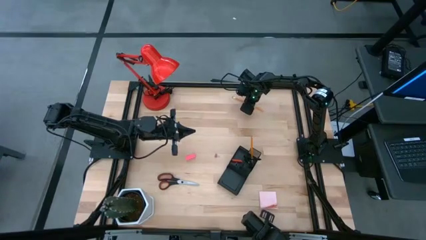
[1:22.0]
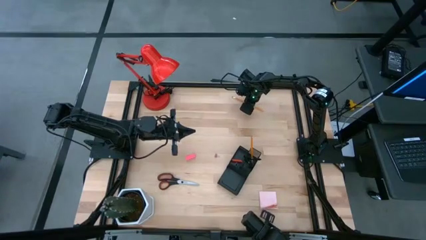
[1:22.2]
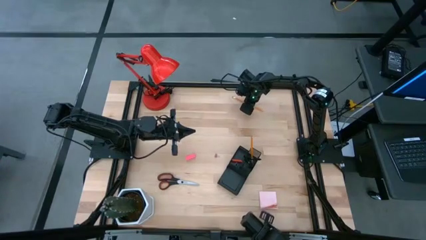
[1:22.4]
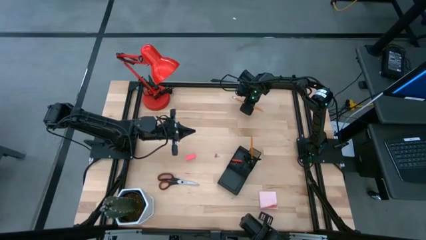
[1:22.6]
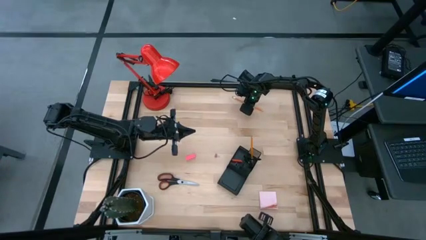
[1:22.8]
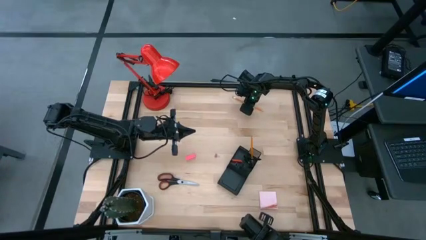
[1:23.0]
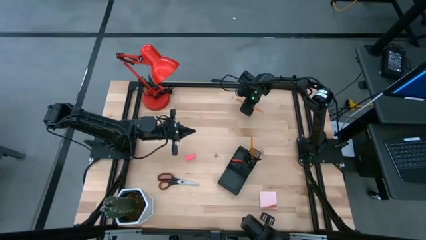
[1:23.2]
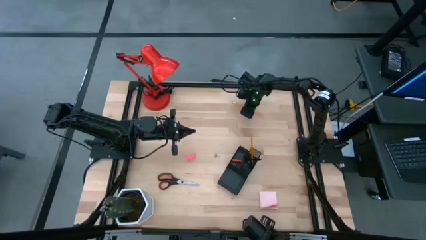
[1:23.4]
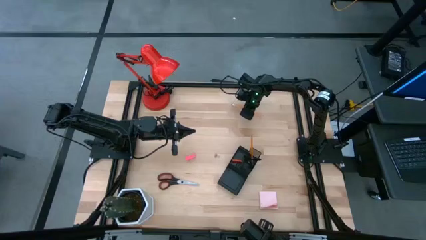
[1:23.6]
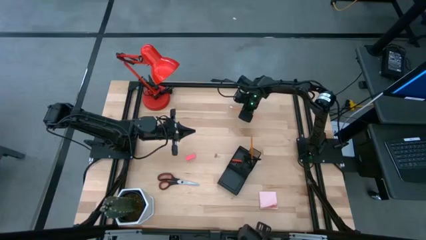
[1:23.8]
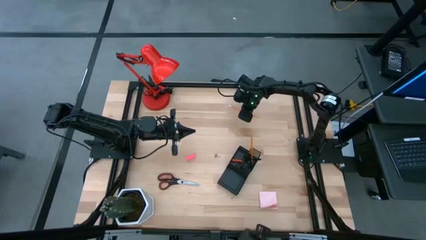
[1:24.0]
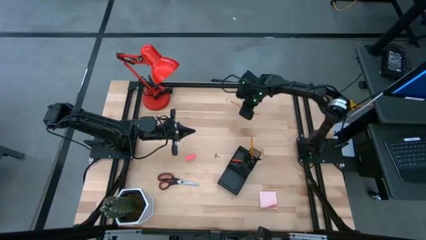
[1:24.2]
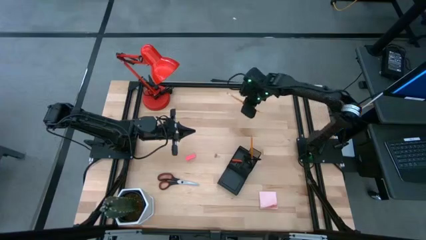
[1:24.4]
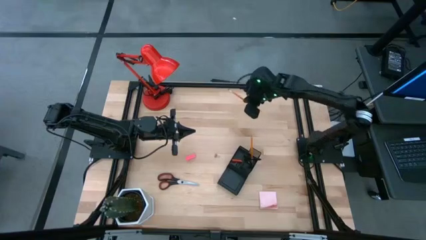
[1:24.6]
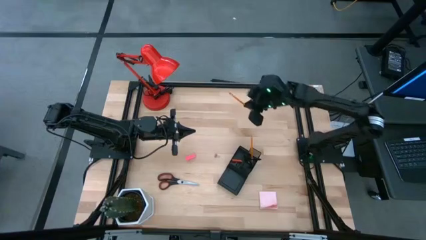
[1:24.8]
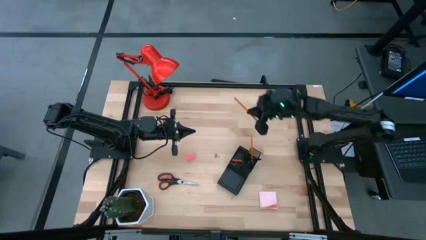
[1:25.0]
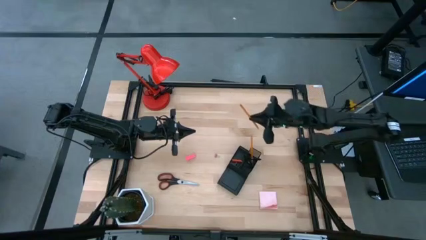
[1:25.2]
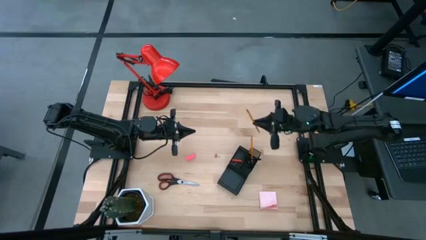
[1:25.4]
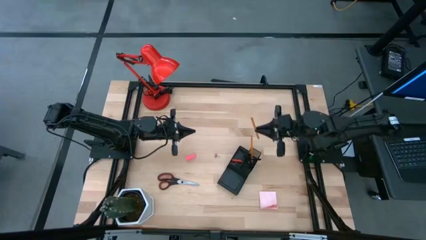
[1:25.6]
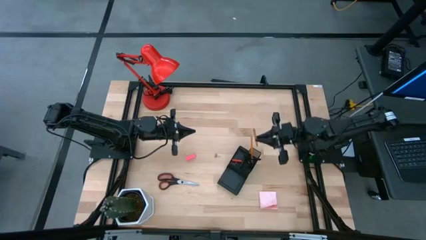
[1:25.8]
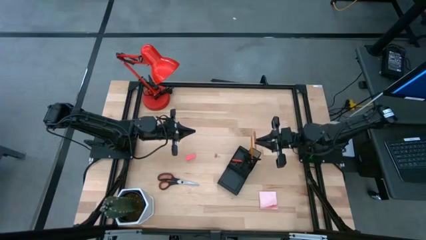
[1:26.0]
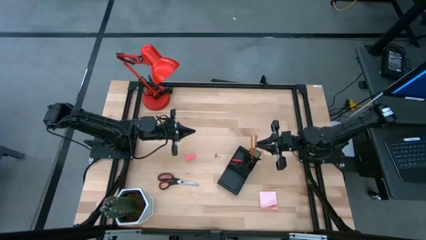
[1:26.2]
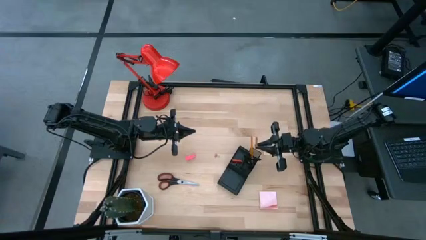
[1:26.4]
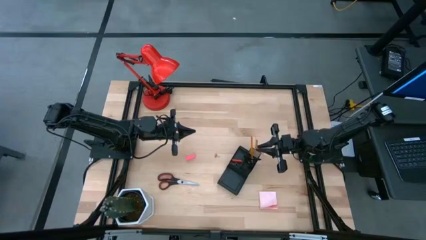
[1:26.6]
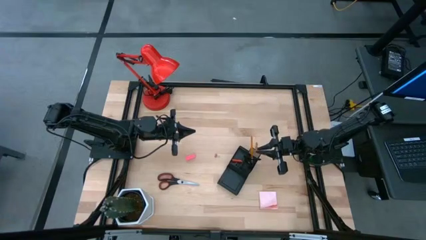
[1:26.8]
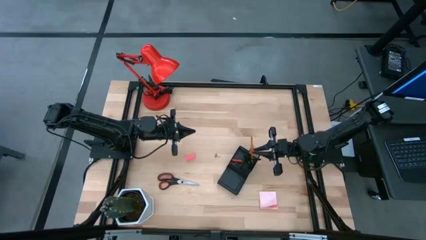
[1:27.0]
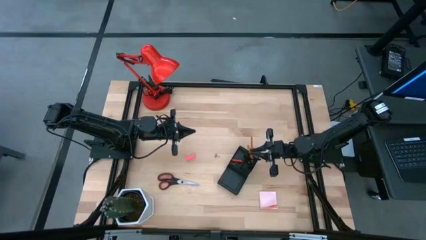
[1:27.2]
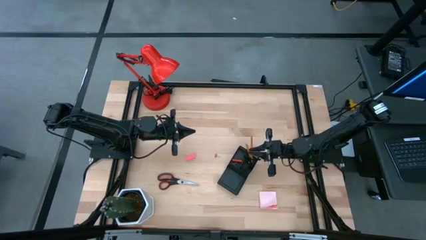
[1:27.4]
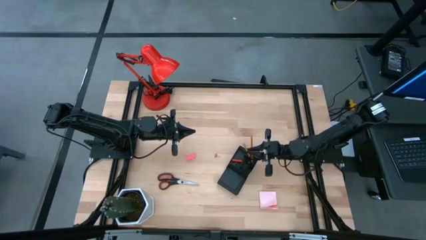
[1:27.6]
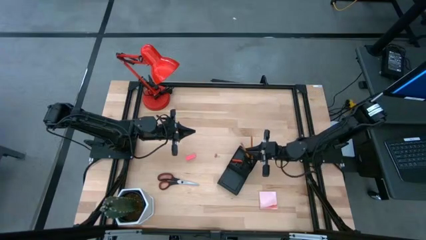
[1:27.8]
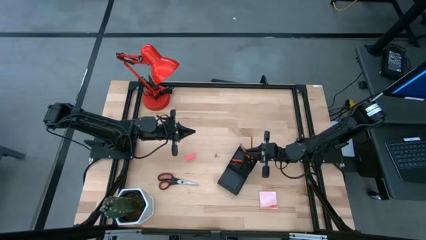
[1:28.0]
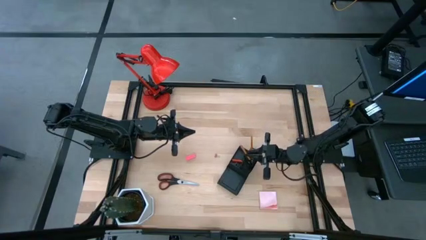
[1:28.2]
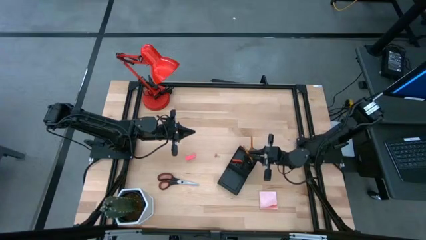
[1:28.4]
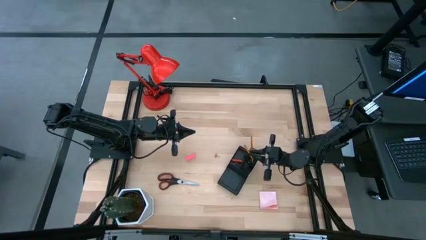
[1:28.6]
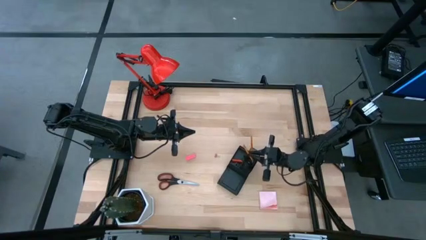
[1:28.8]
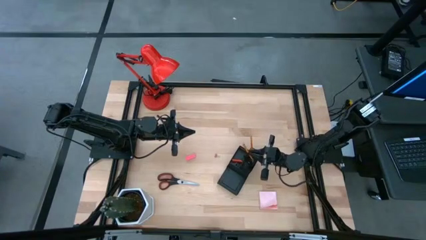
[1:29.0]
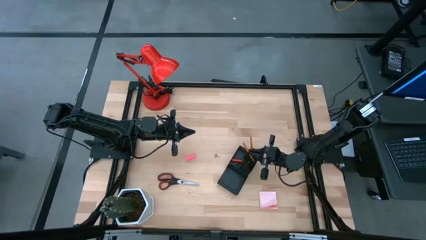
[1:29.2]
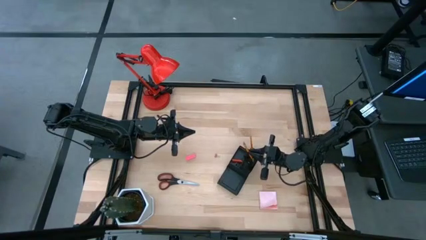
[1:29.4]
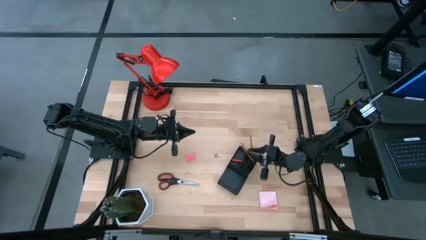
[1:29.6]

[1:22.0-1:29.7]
Task: Pick and place office supplies into organizer
Put the pencil into the desk organizer
